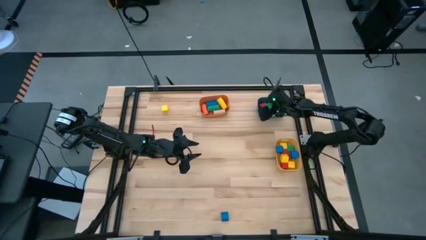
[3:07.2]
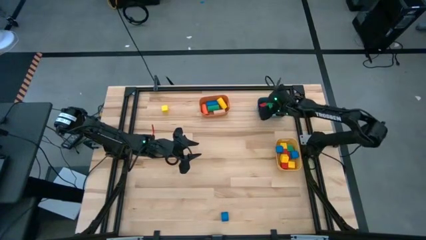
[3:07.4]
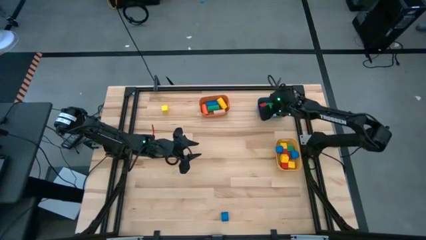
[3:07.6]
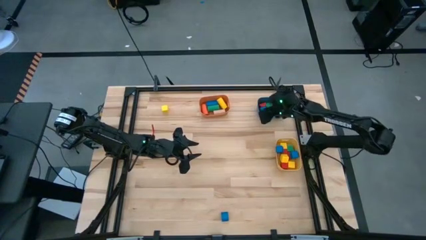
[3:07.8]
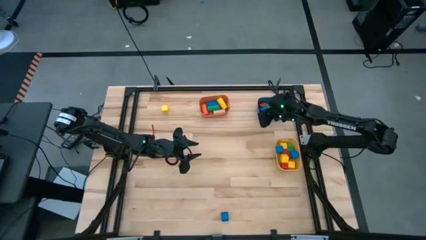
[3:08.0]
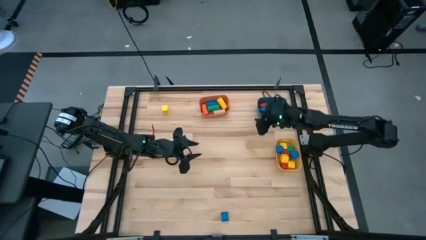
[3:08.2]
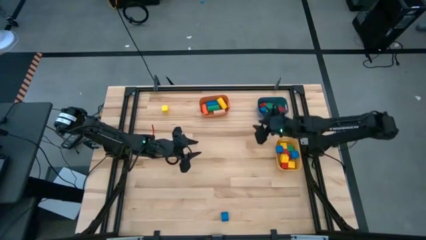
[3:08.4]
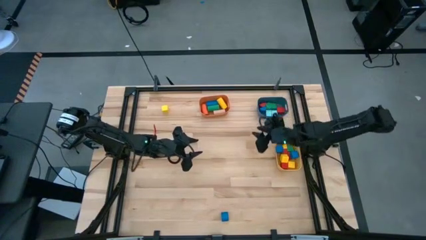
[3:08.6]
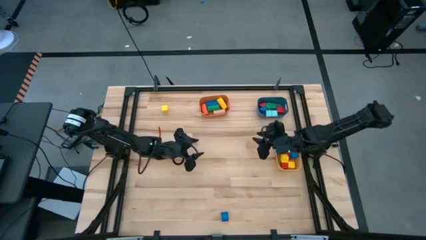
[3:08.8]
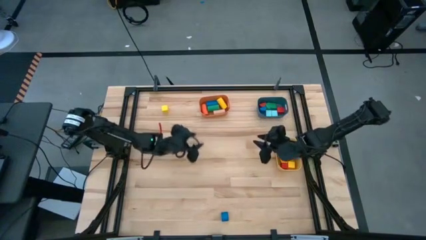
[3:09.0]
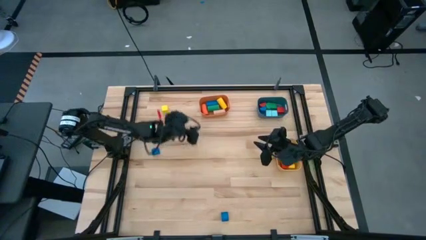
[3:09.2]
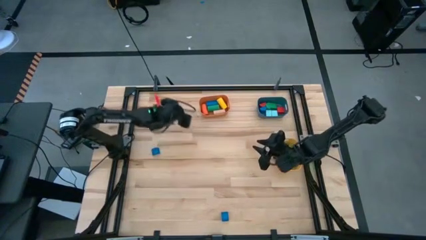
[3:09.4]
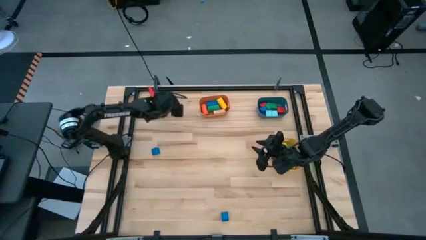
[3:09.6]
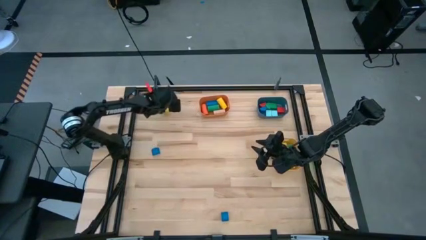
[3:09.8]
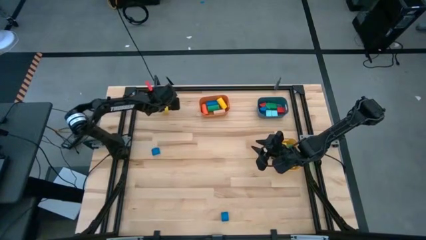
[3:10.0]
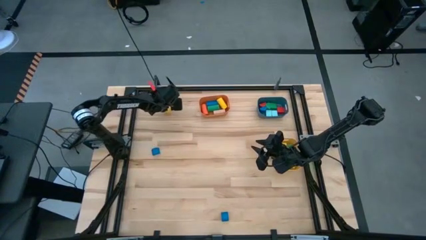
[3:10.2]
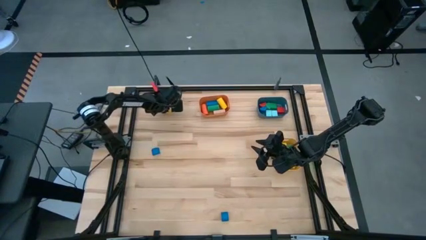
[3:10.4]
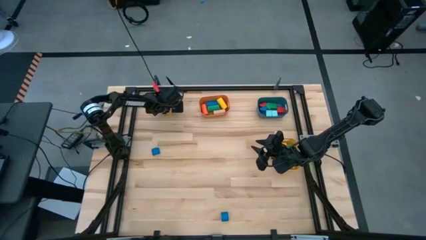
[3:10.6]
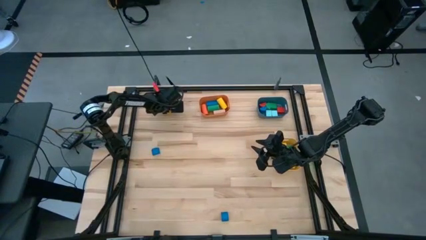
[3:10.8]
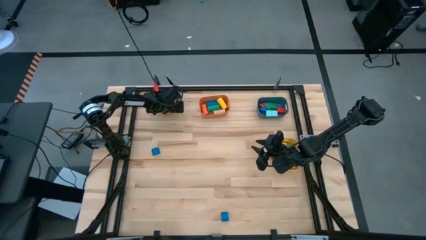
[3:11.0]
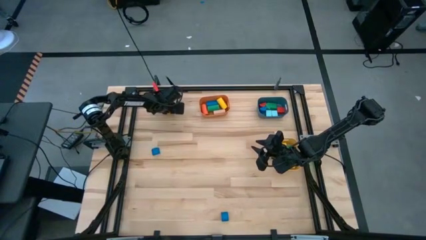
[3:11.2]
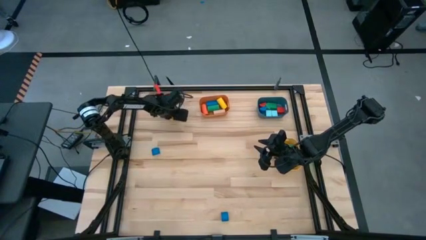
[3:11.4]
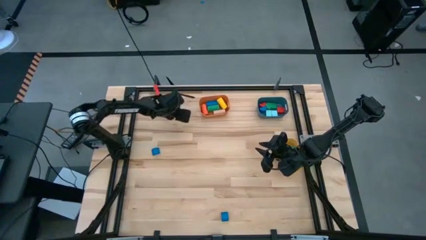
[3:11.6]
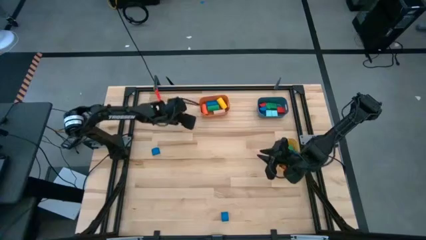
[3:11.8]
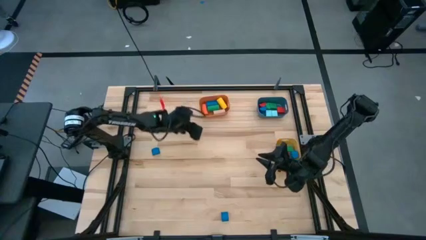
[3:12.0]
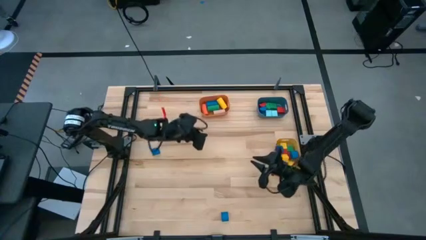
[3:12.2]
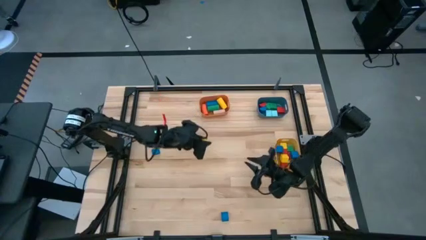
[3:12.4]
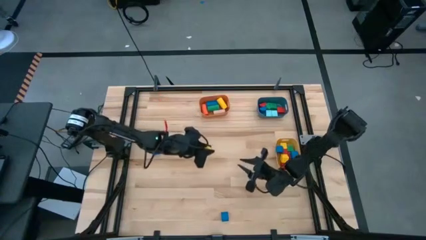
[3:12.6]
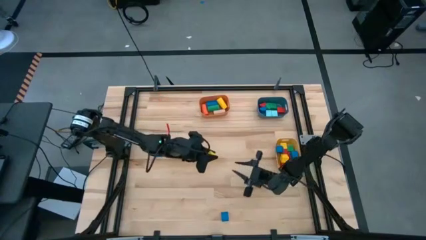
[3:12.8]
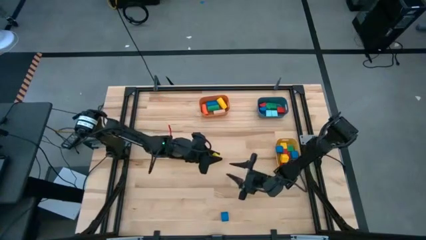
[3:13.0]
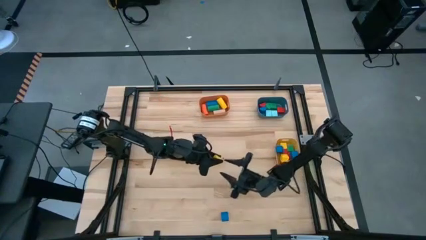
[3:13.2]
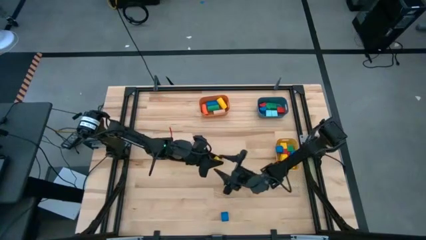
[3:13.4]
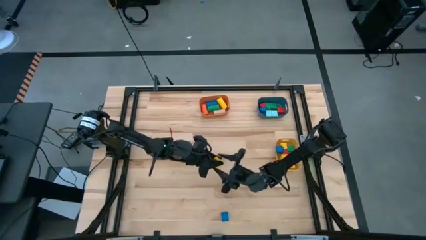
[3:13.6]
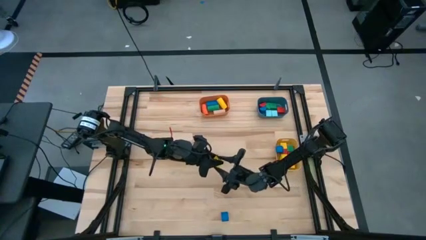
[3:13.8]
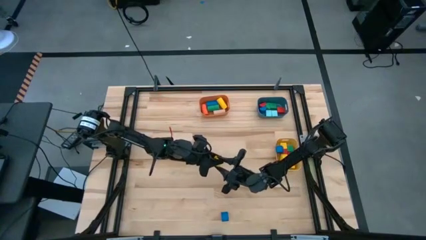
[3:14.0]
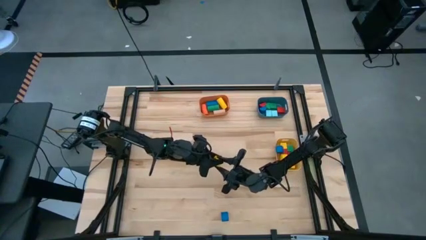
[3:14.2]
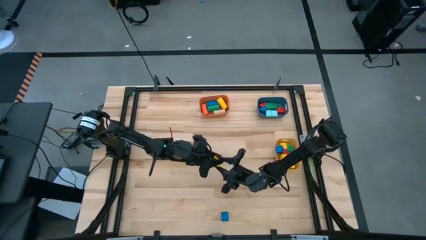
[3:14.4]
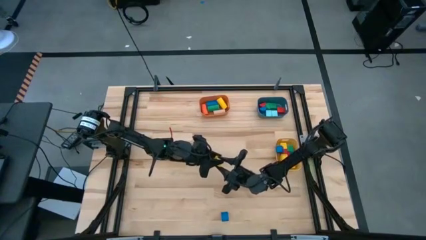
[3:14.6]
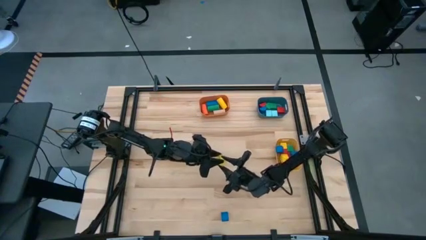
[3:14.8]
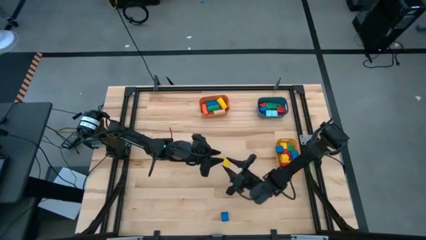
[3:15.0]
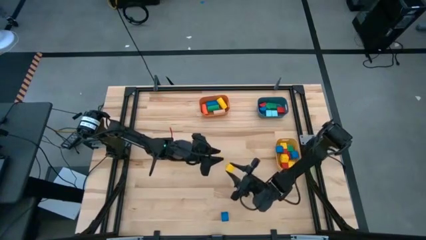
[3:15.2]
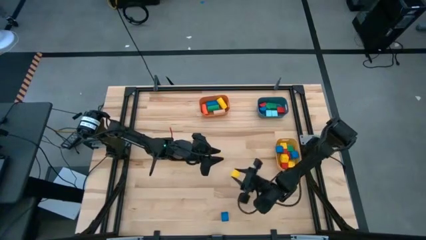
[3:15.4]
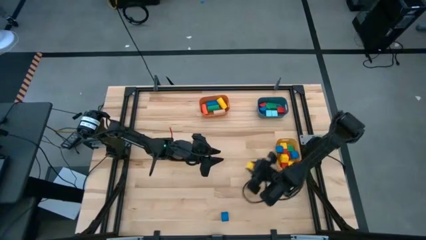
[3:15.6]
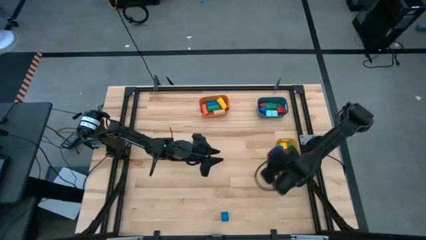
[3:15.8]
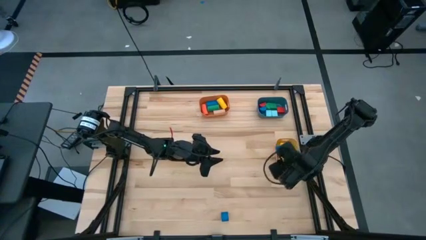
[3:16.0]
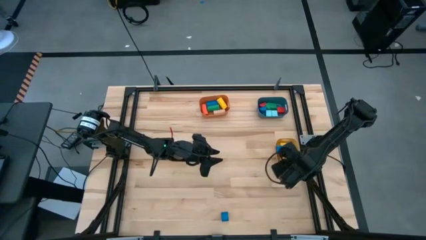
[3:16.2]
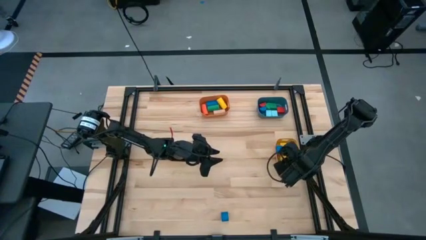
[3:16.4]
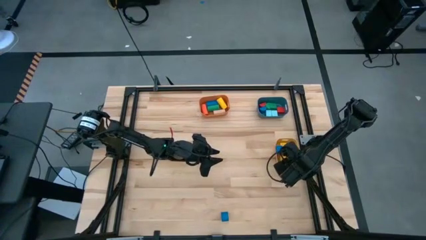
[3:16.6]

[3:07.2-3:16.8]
Task: Sort blocks by size
Put the yellow cube block into the yellow bin

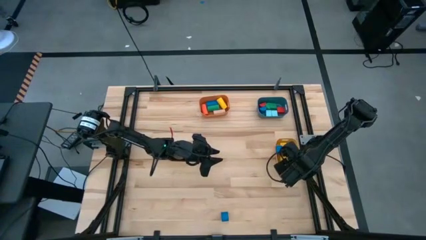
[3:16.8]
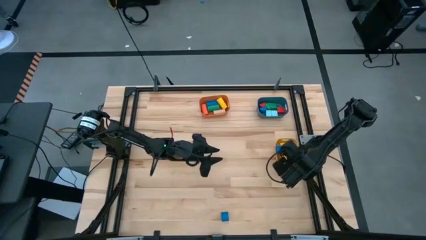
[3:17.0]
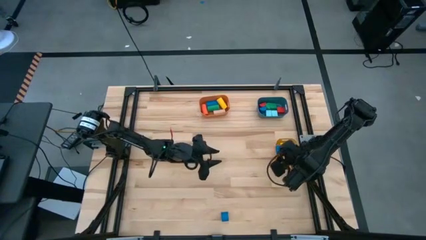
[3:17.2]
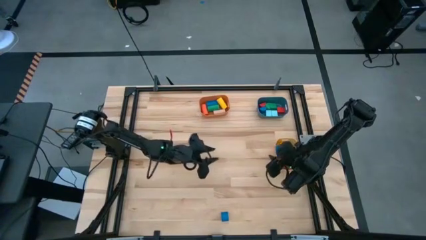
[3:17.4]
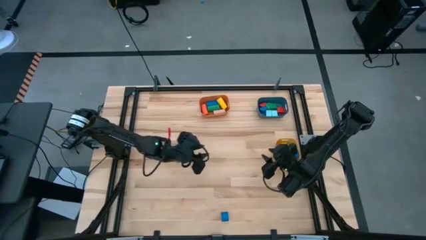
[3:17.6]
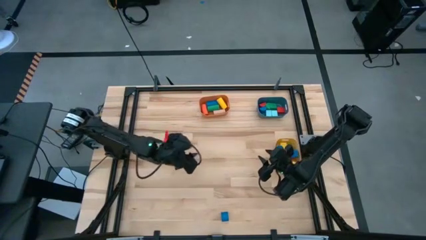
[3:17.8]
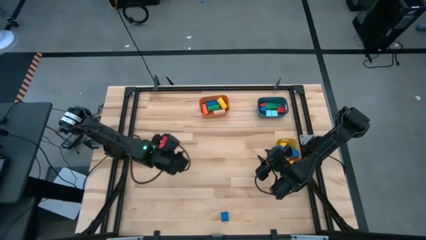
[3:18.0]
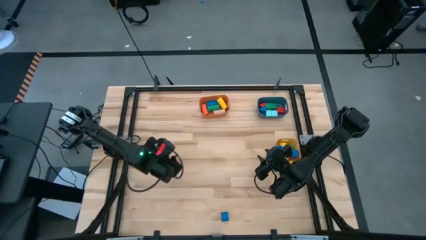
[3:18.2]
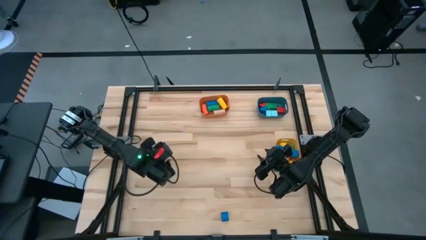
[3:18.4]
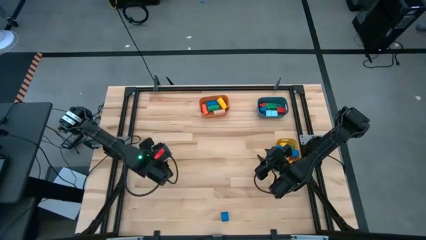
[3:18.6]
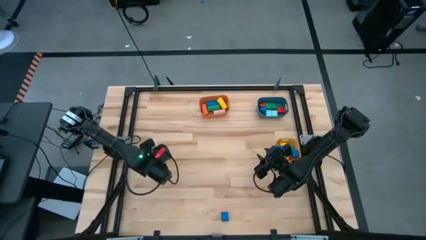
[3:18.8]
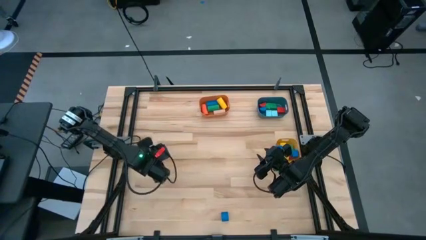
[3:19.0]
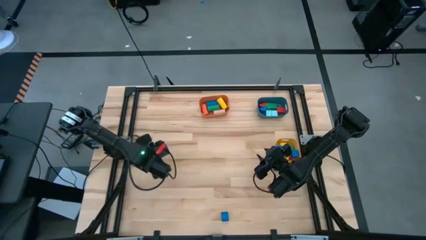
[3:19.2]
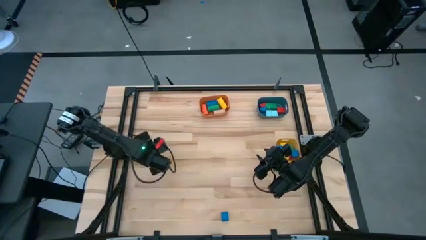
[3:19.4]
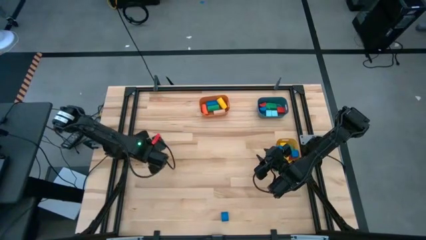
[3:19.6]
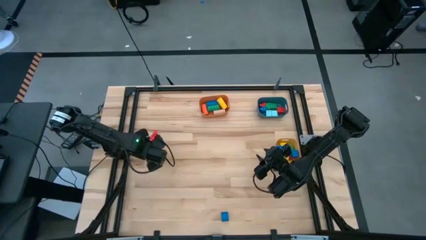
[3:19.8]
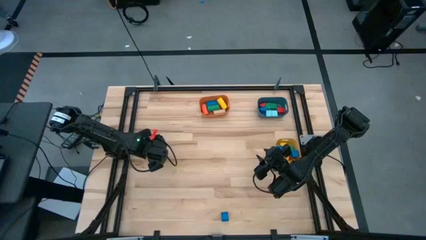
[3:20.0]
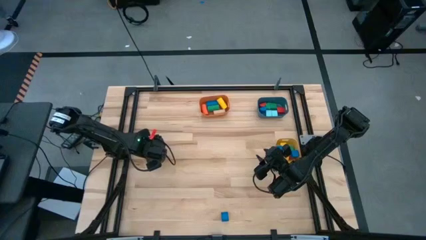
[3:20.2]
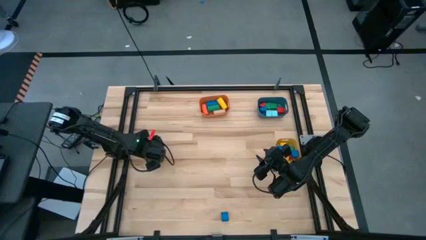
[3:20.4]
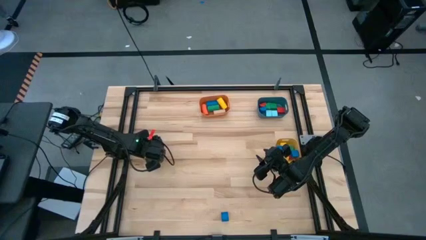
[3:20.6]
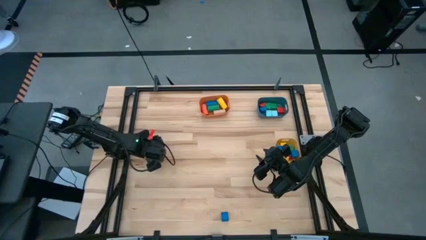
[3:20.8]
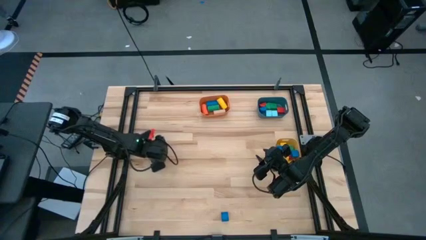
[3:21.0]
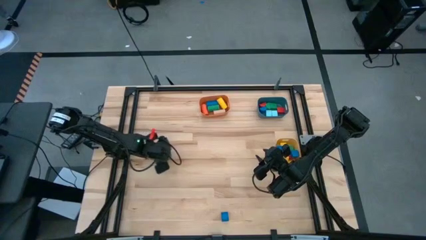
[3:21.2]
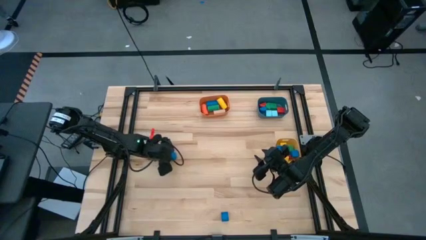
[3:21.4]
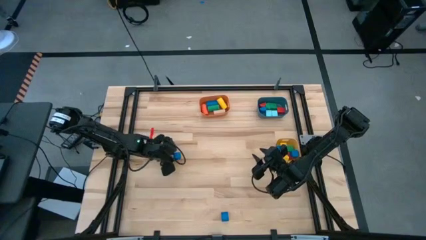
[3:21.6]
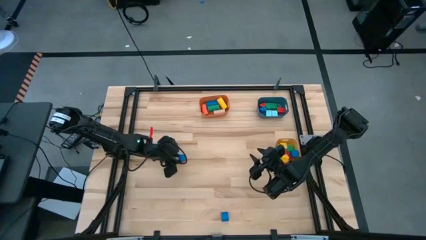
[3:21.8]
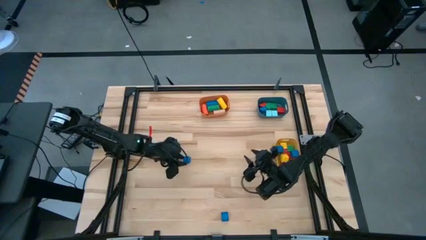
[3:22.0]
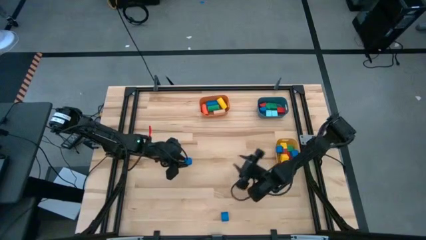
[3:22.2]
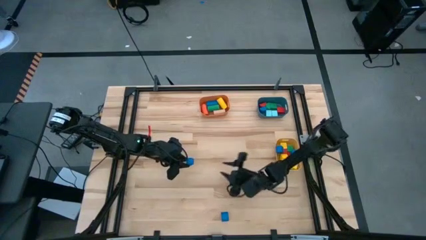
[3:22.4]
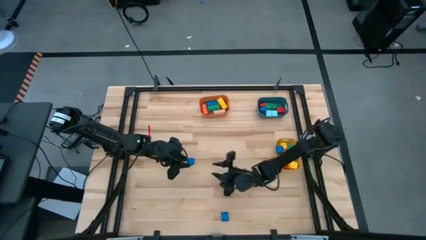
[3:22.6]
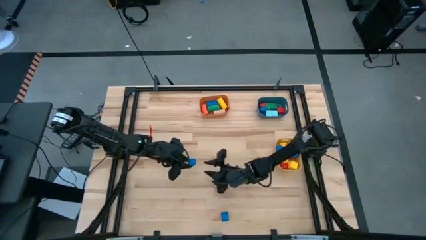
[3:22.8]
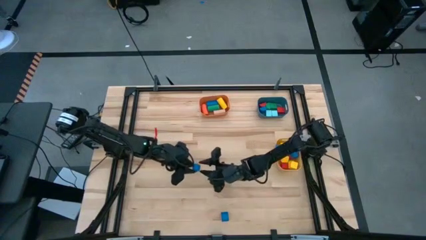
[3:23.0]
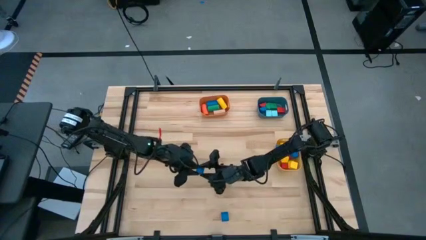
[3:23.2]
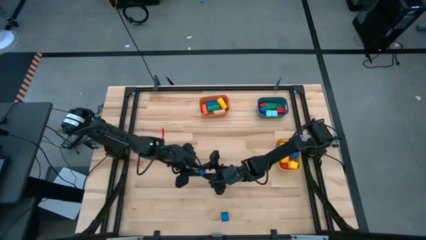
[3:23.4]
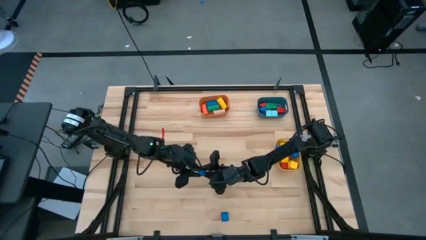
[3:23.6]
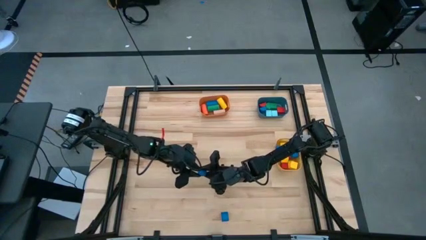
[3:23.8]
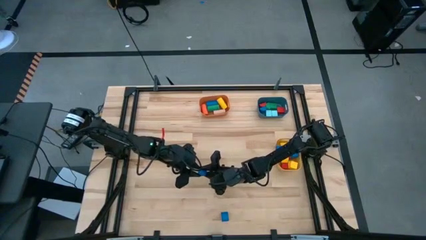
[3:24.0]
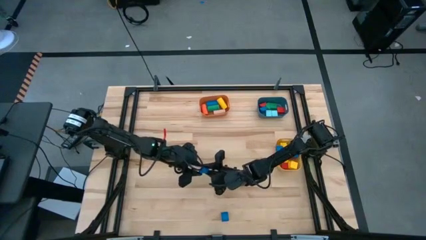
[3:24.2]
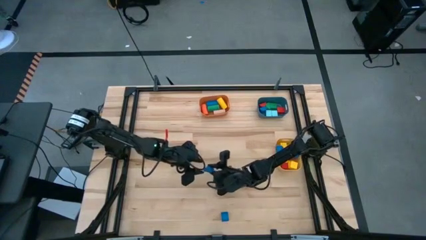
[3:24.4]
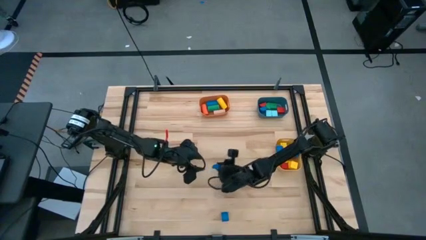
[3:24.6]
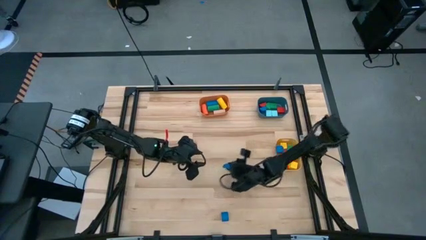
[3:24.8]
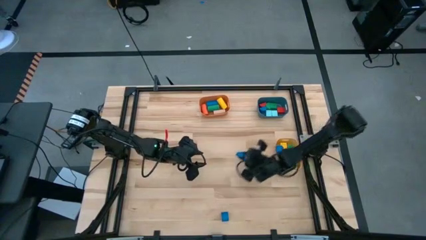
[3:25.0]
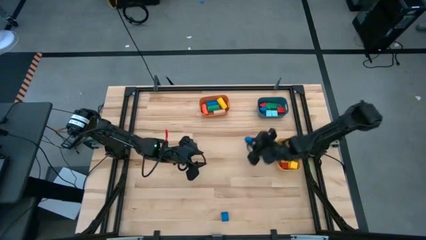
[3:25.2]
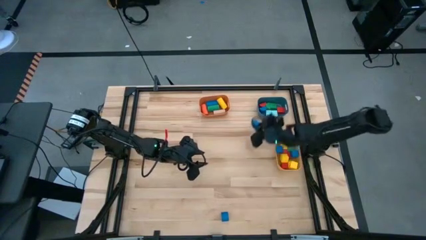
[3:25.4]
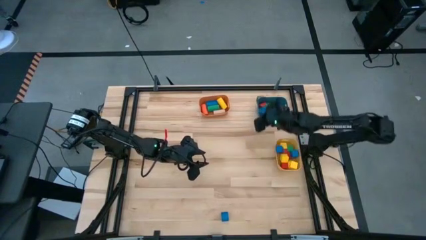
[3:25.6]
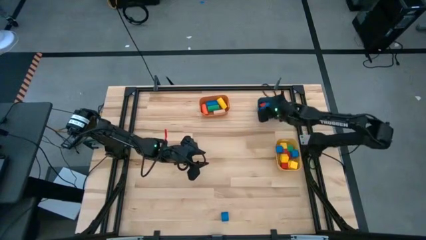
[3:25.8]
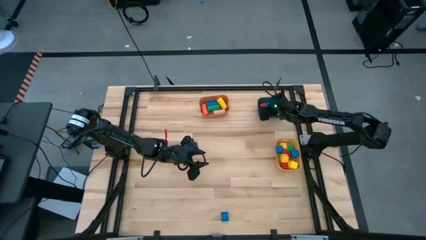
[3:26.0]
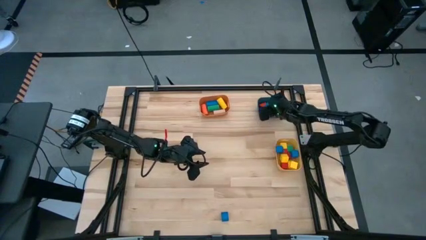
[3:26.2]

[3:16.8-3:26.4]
Put the blue half circle block into the blue bin
